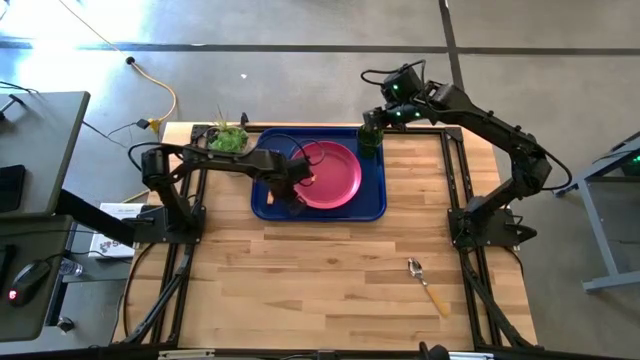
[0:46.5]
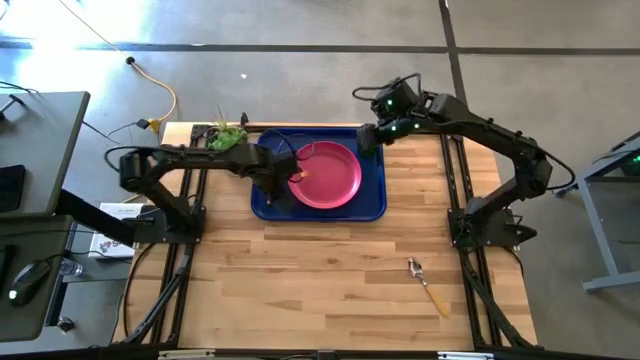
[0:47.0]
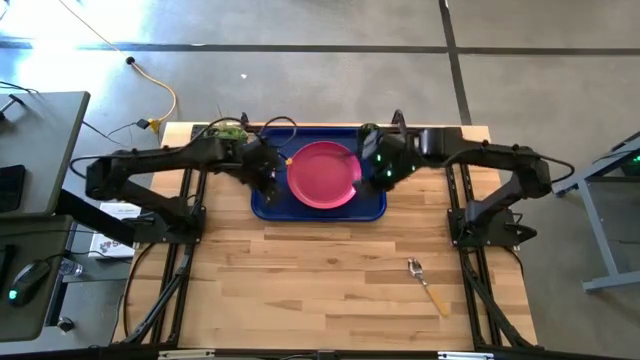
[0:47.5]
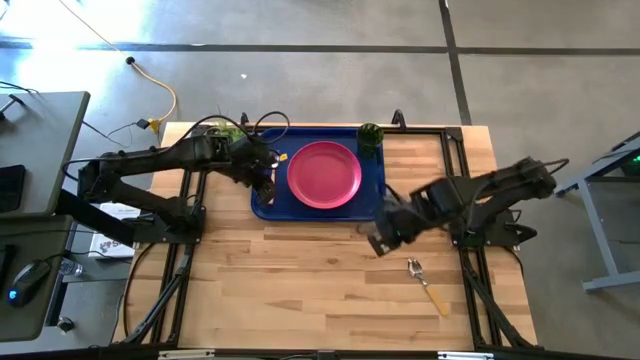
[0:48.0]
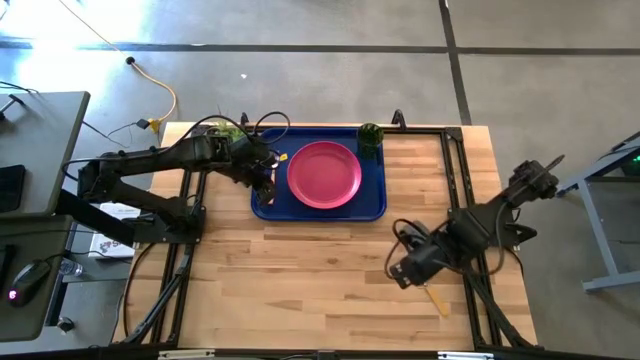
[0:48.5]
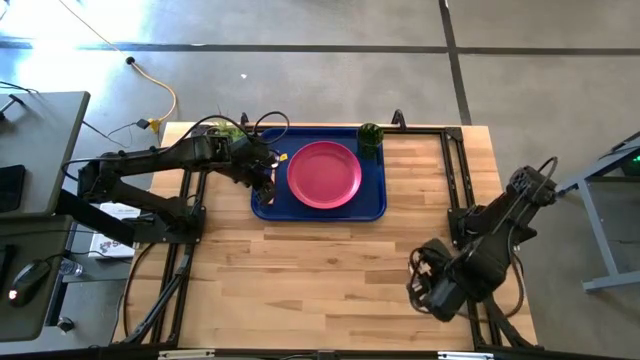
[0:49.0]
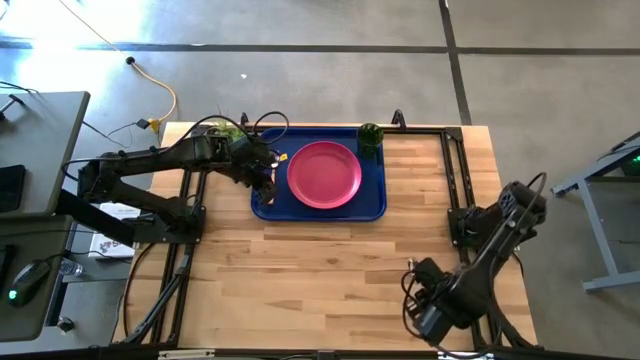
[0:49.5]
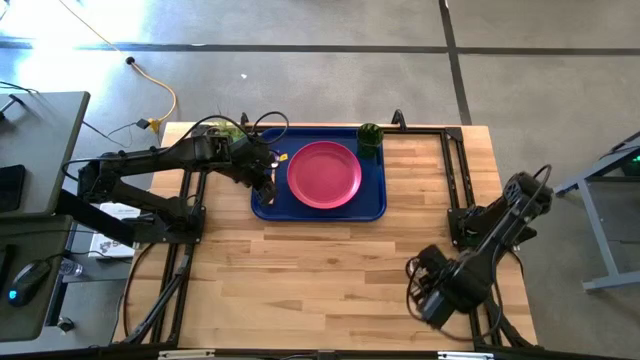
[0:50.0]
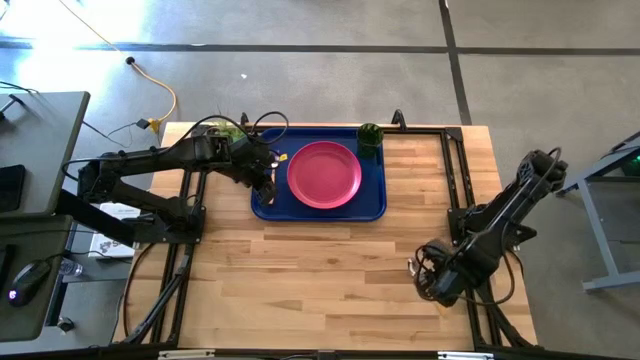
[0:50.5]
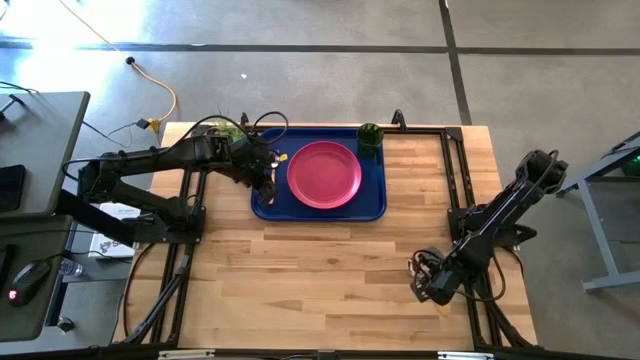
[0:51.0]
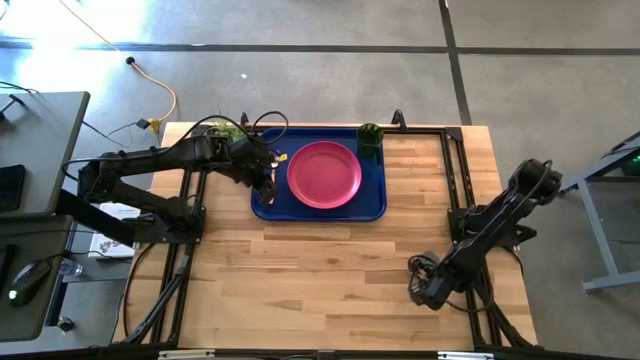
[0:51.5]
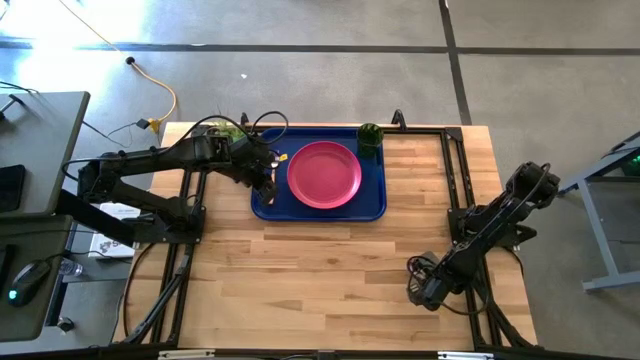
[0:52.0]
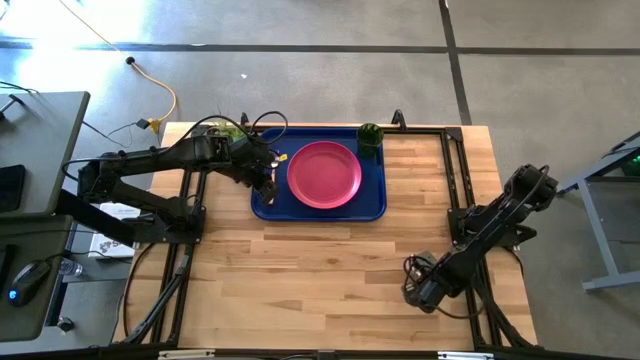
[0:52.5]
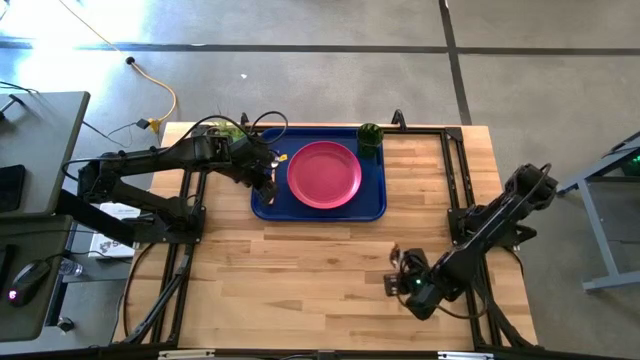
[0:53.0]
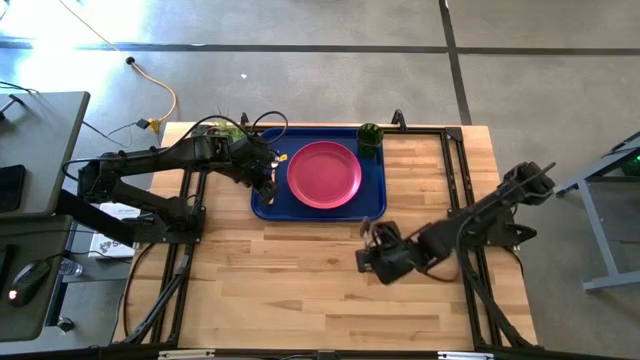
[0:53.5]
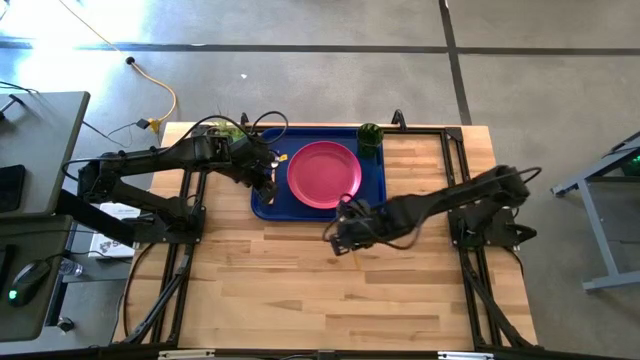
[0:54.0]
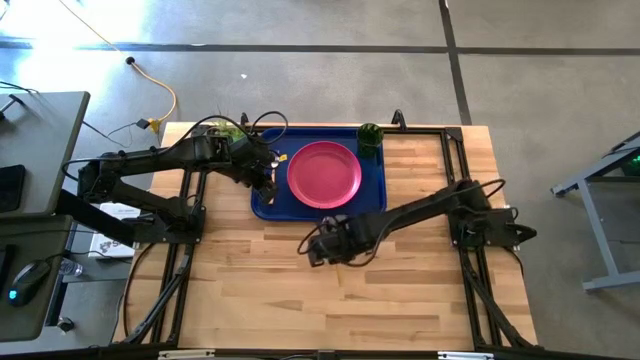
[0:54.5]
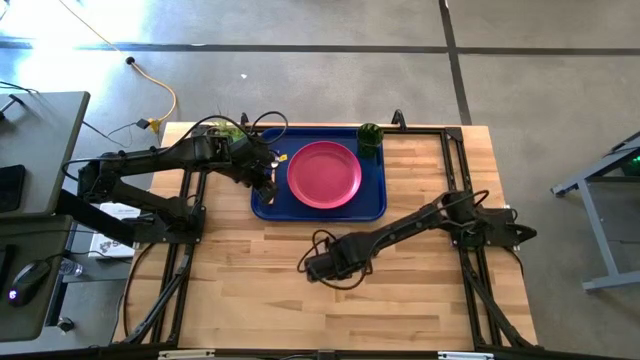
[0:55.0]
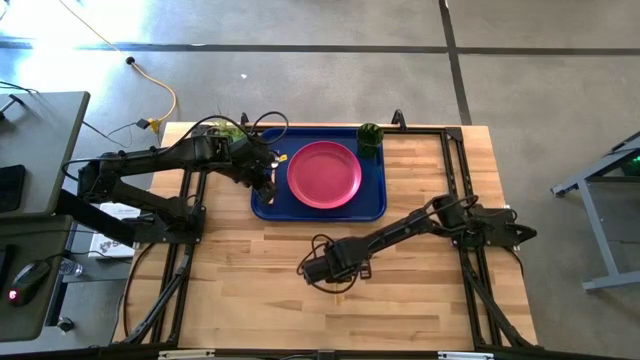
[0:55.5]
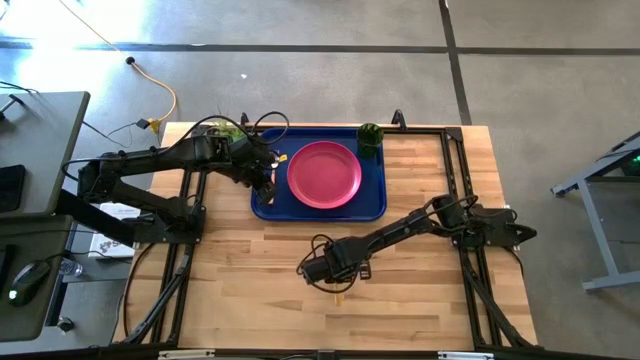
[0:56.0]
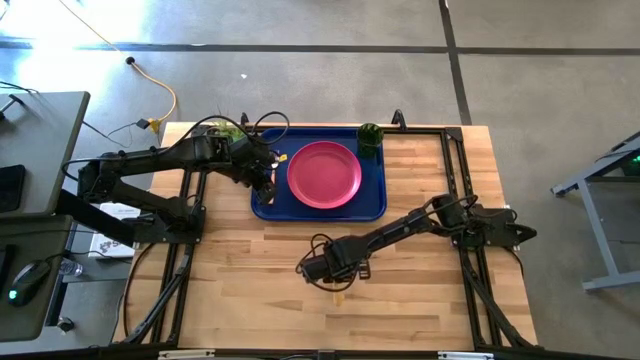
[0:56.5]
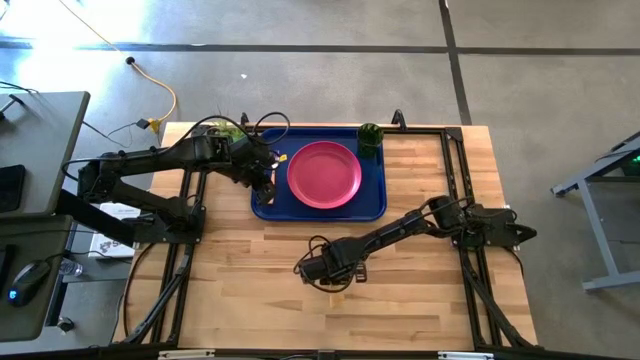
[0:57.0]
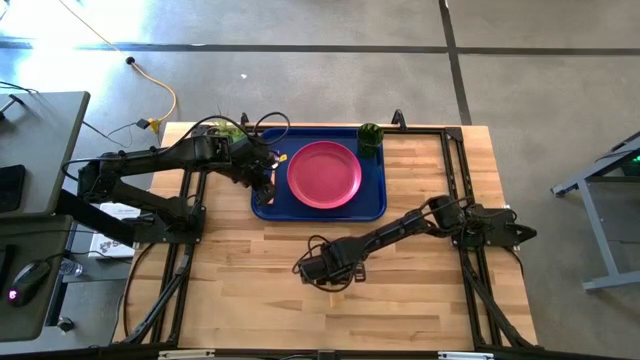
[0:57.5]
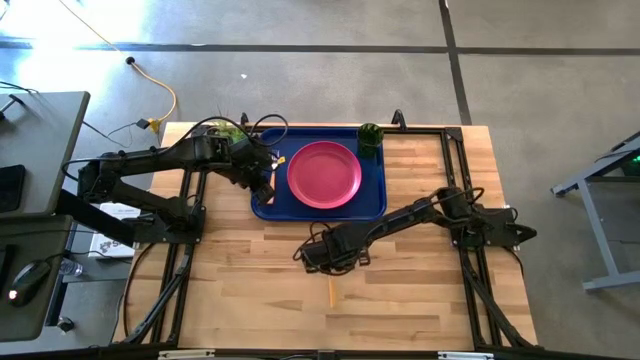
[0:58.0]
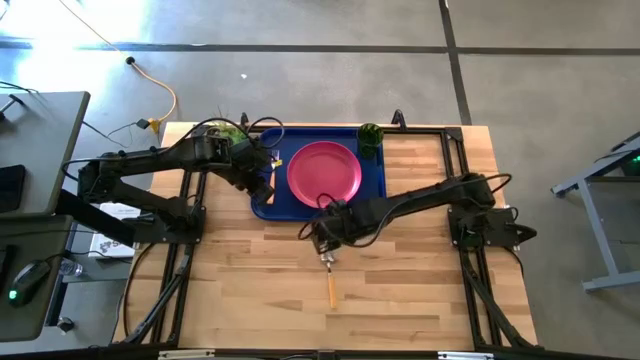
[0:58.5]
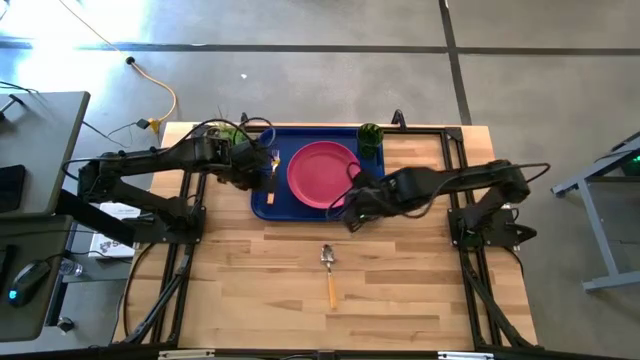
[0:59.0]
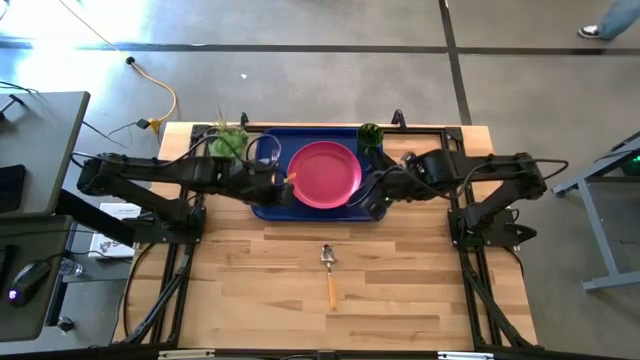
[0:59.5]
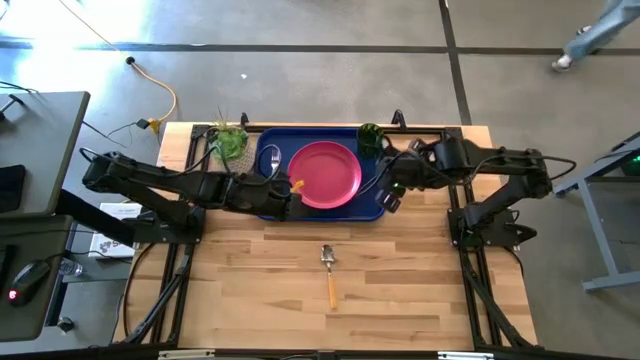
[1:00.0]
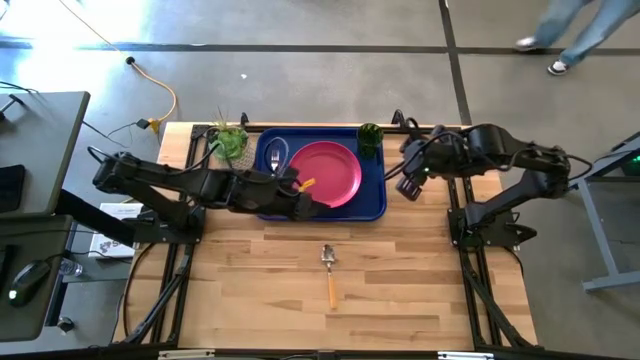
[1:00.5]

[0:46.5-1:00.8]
Task: Pick and place plate/cup/fork/spoon on tray
Put the orange spoon on the left of the pink plate on the blue tray

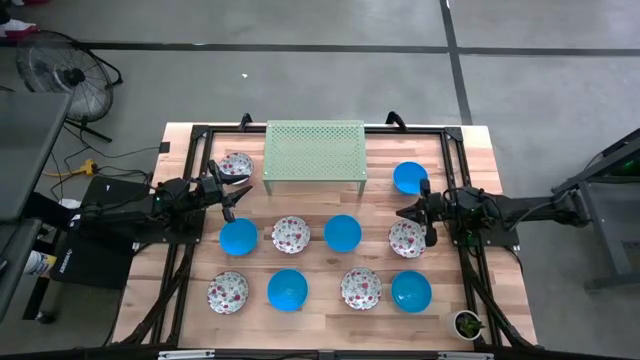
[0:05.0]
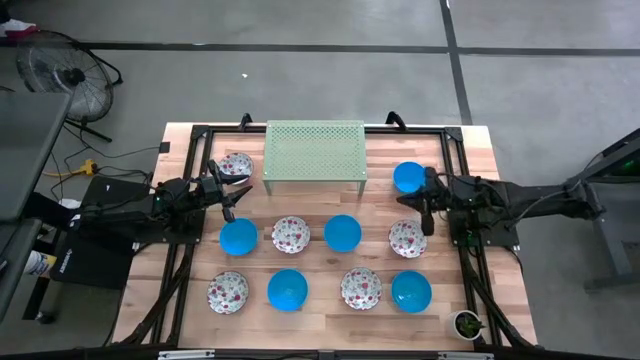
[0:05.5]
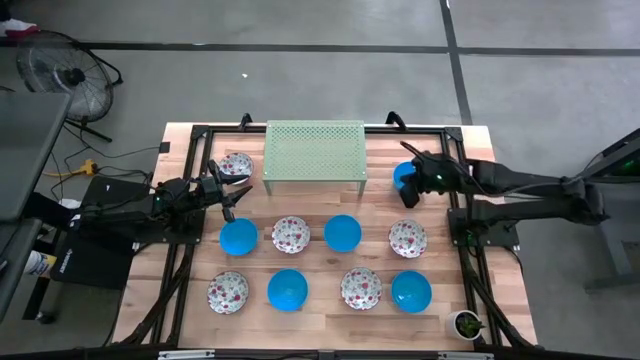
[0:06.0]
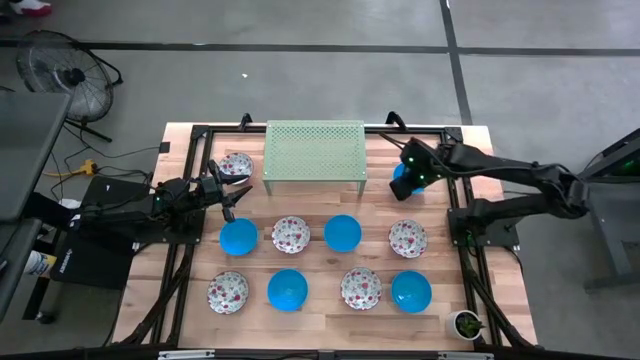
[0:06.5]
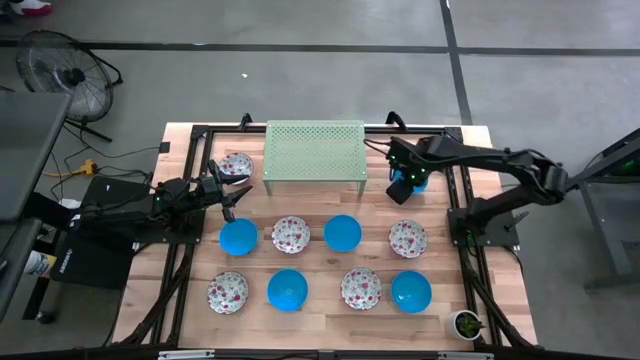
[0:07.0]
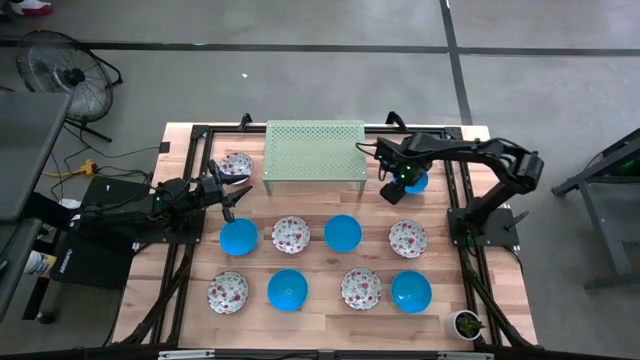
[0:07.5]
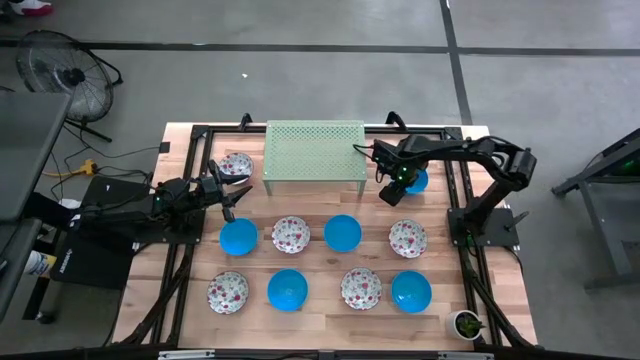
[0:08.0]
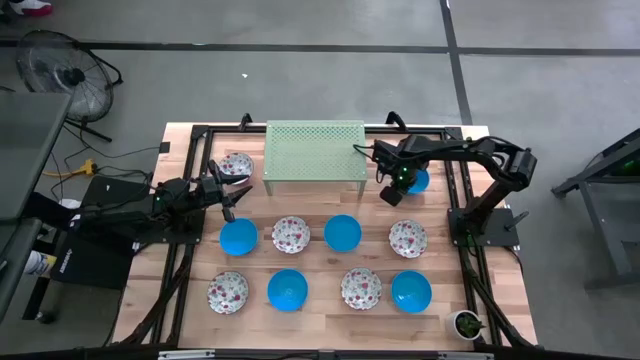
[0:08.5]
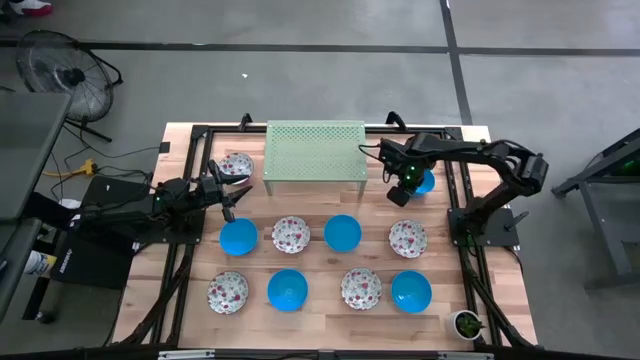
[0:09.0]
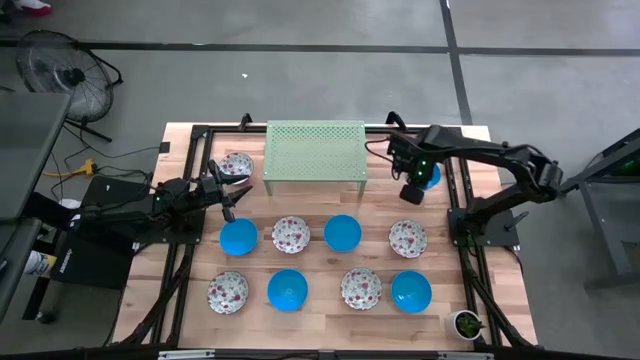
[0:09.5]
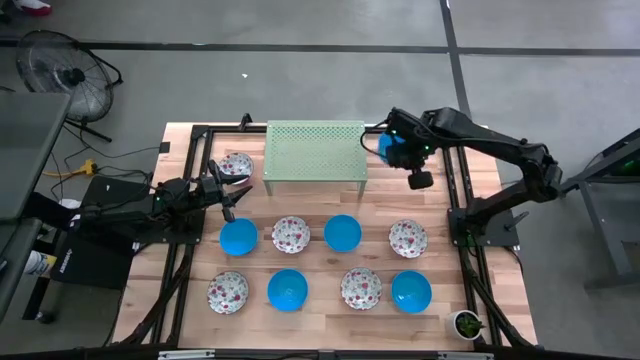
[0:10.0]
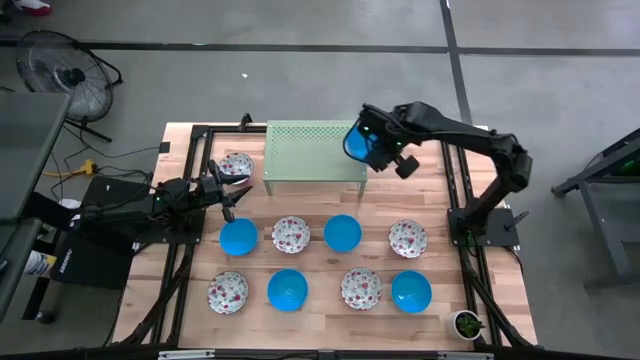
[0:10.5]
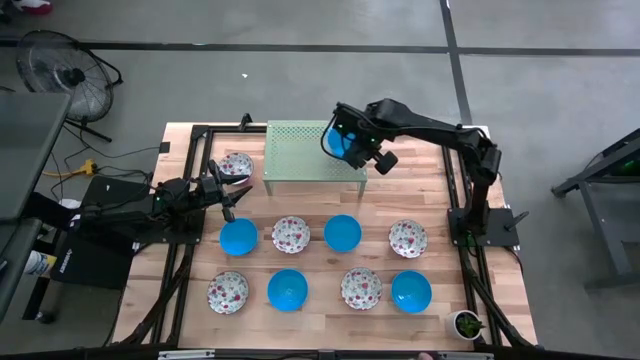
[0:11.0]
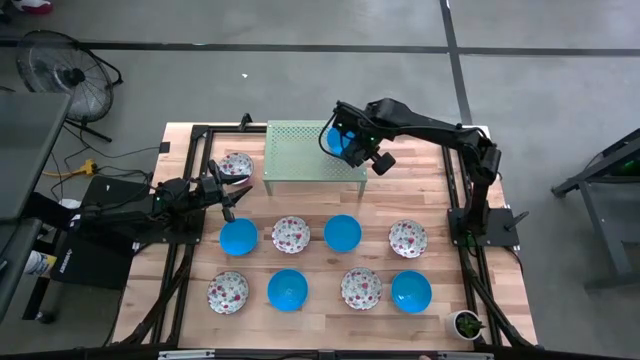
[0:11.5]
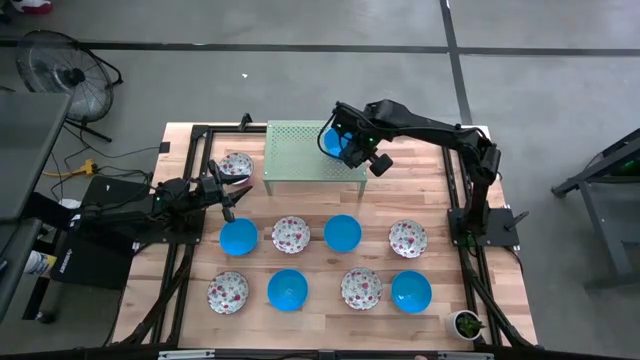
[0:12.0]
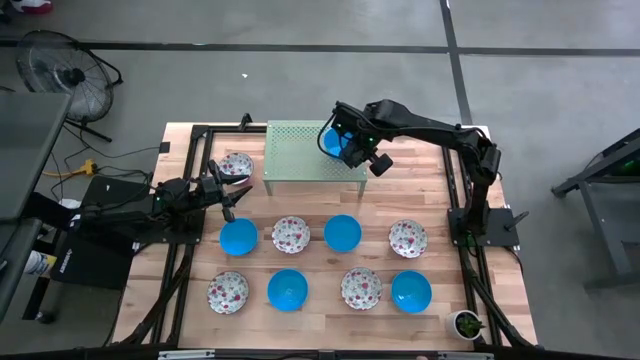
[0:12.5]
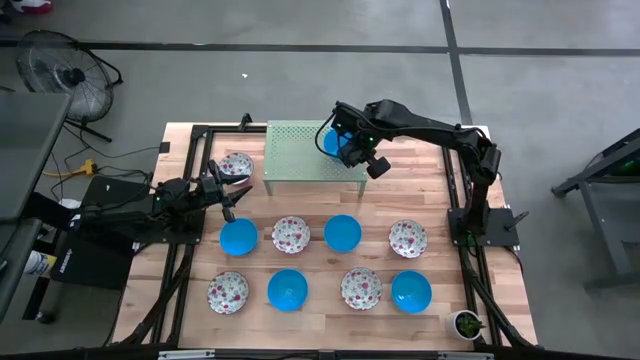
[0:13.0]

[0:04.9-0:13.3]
Task: Pick & Place Mini bowls
Put the blue bowl on the shelf
